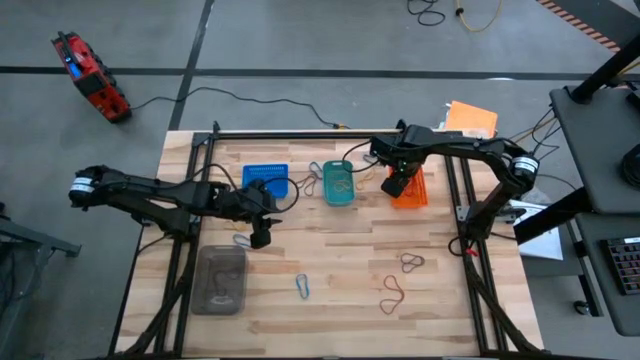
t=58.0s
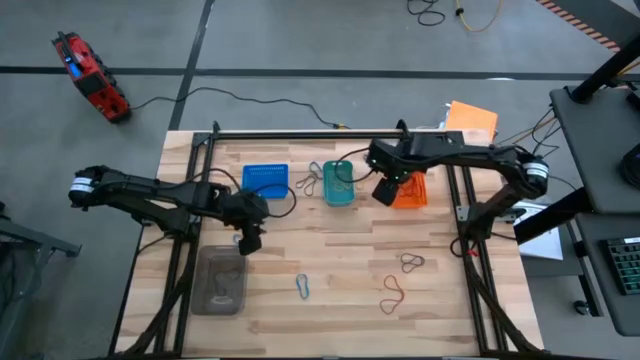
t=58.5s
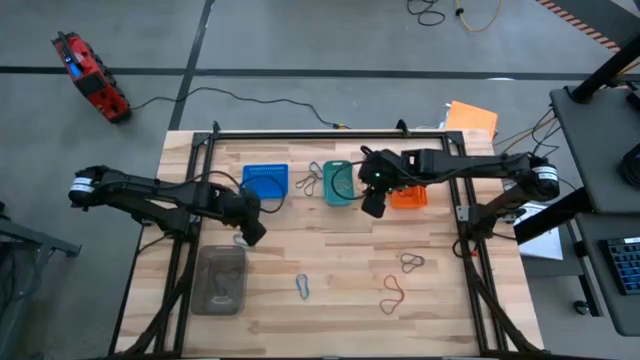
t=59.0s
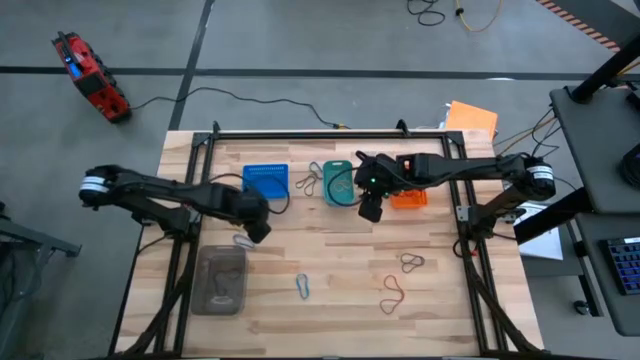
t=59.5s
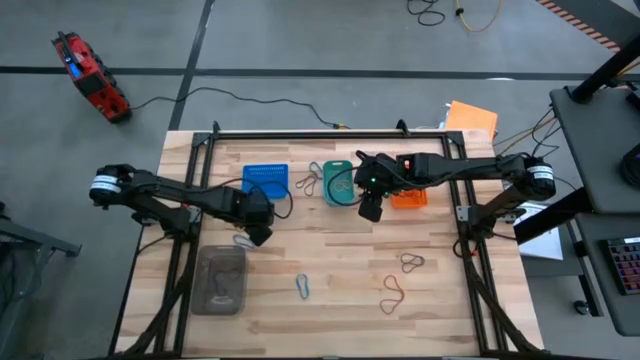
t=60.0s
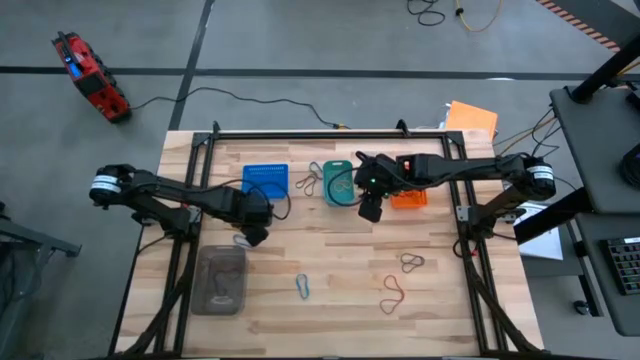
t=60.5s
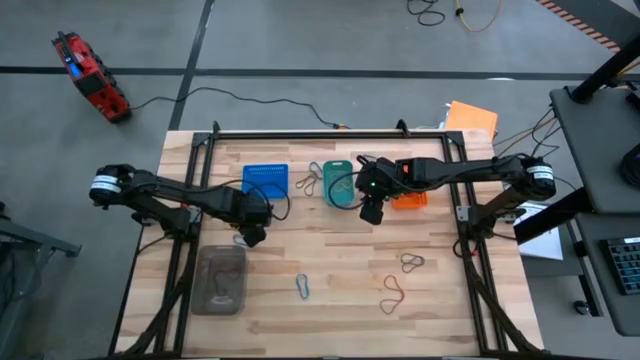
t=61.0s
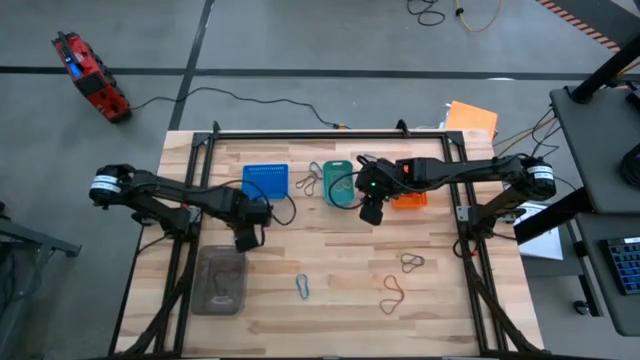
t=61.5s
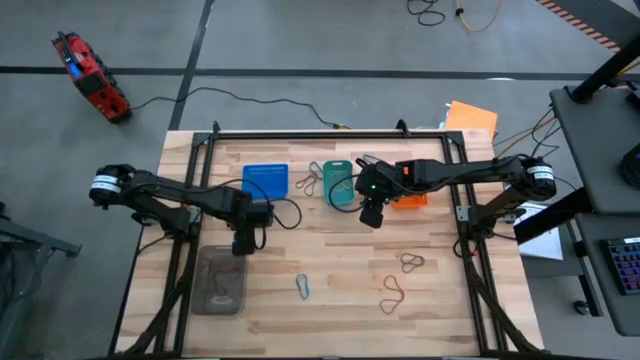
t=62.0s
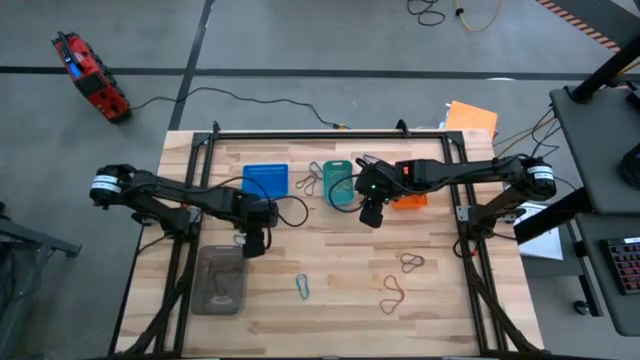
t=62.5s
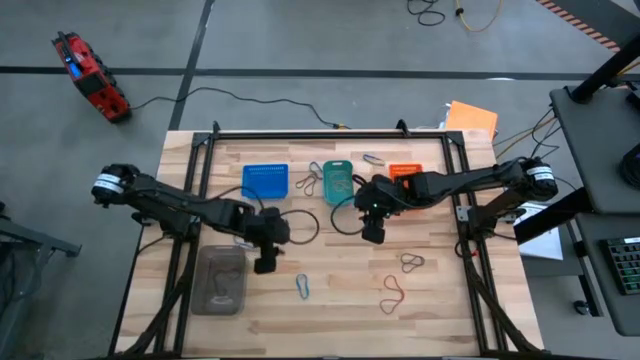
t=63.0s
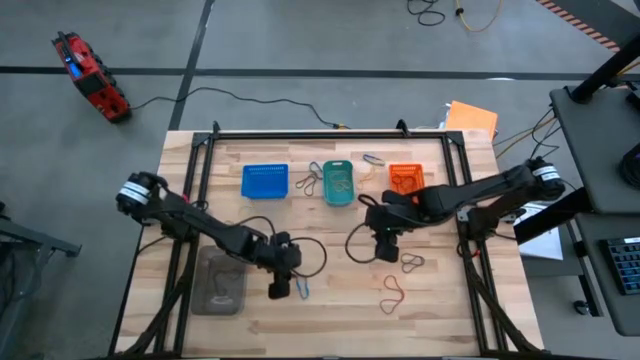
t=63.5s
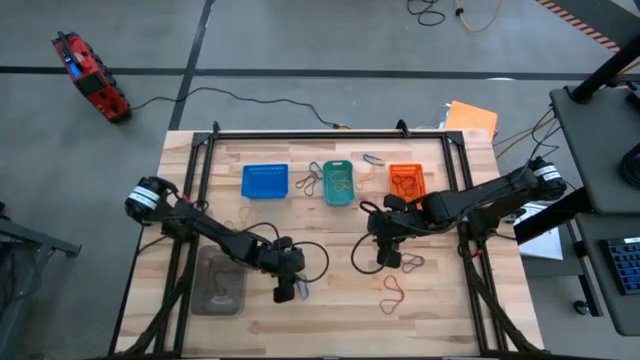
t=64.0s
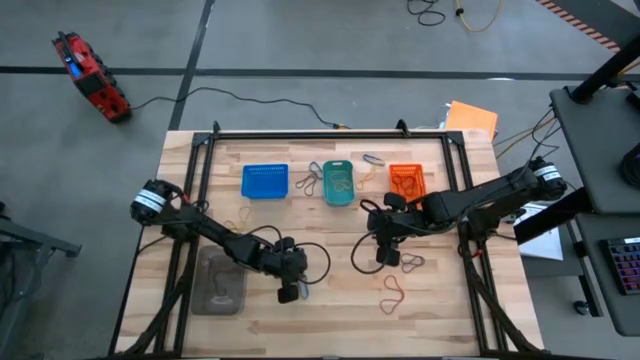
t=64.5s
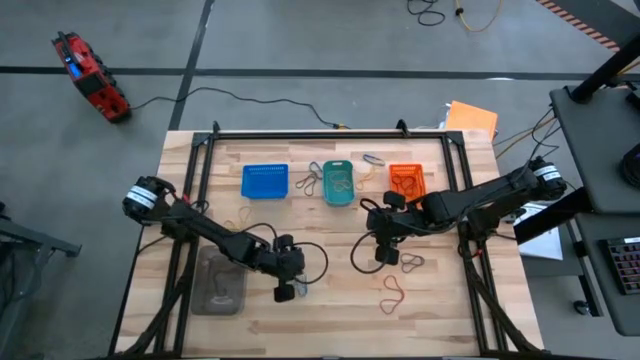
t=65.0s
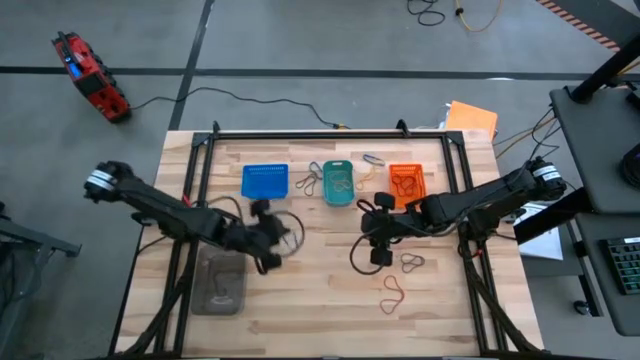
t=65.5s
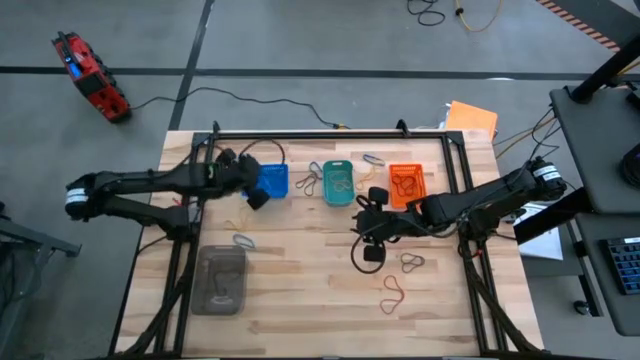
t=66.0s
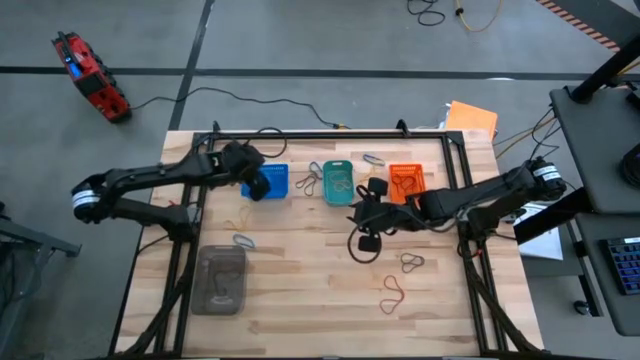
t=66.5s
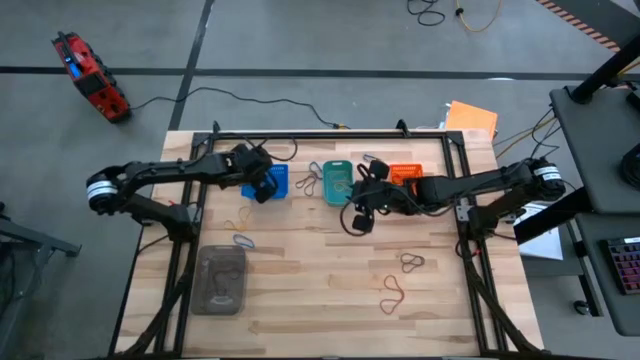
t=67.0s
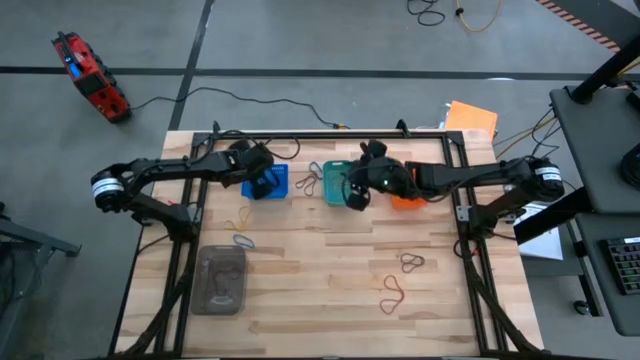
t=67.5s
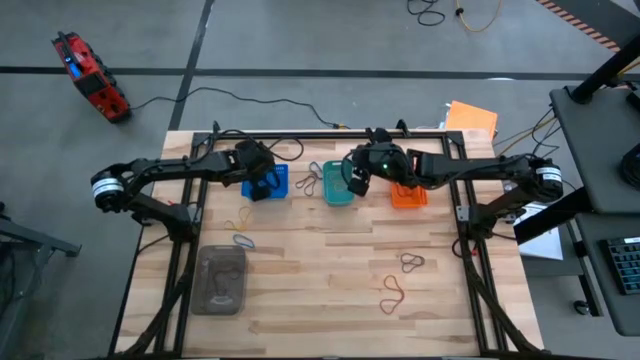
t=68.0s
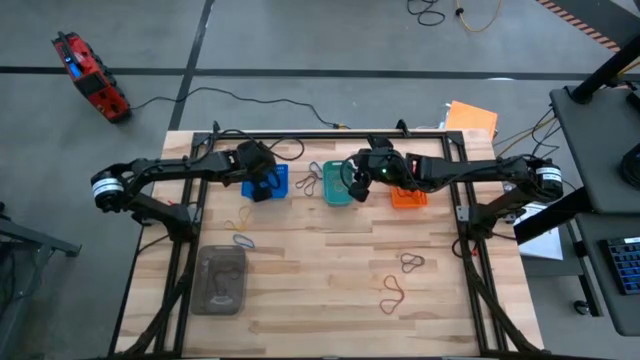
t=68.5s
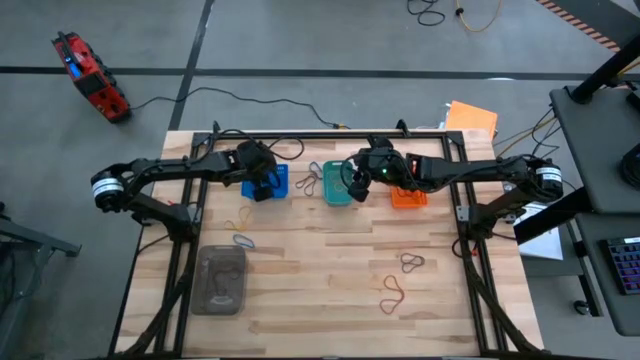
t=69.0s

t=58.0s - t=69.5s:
Task: Sort rubber bands into baskets
Put the bottom center blue rubber band into the blue bin

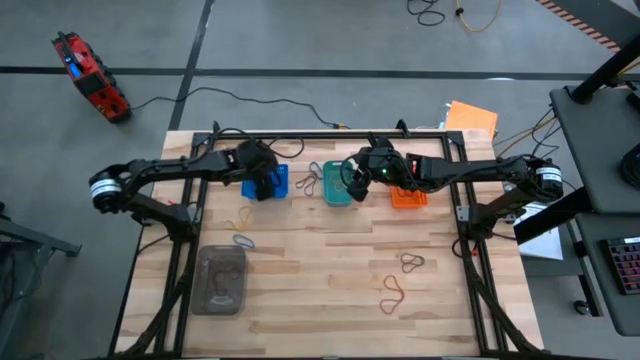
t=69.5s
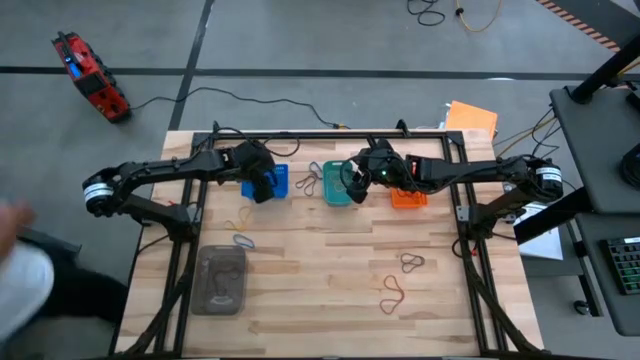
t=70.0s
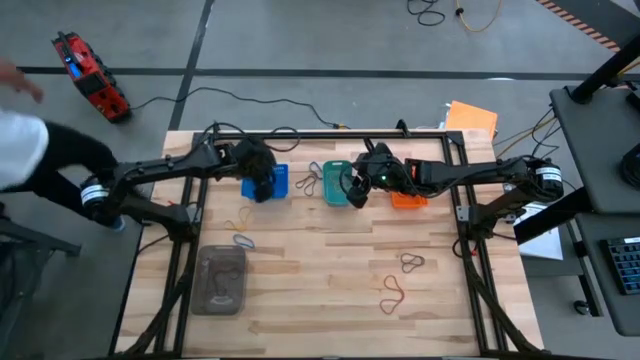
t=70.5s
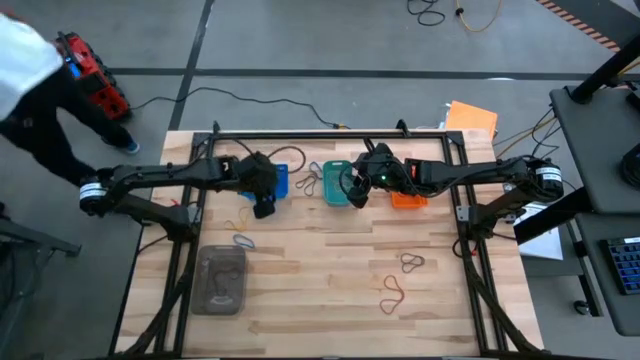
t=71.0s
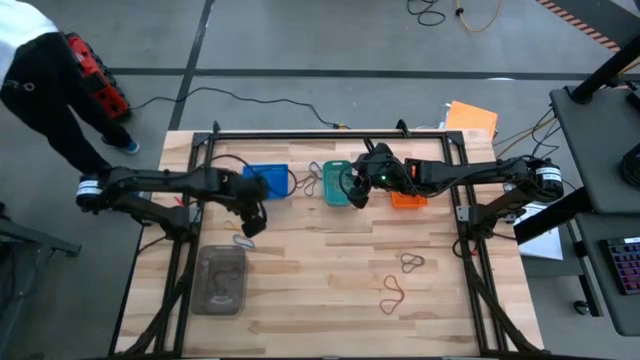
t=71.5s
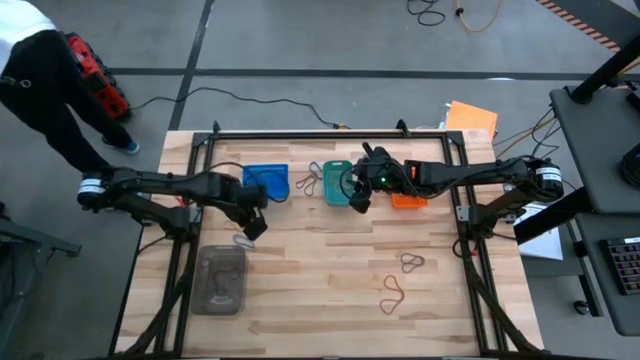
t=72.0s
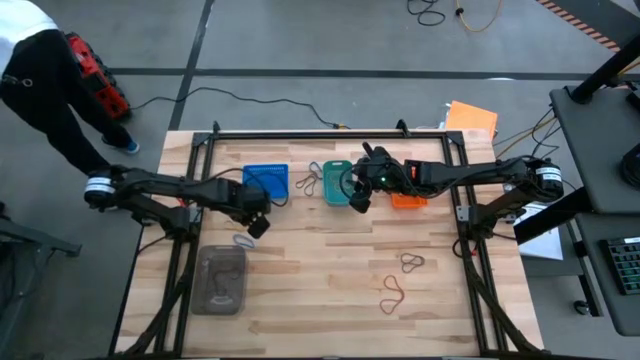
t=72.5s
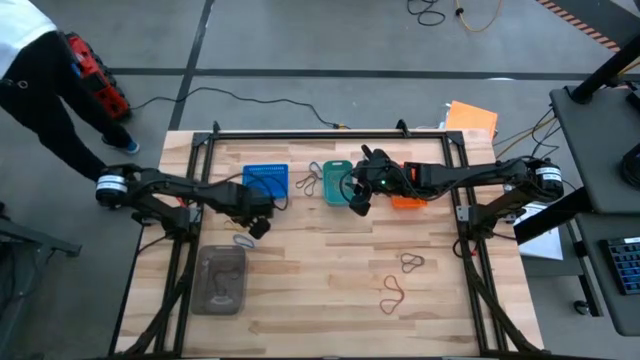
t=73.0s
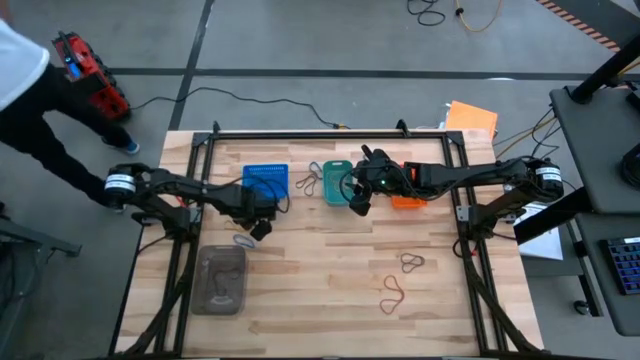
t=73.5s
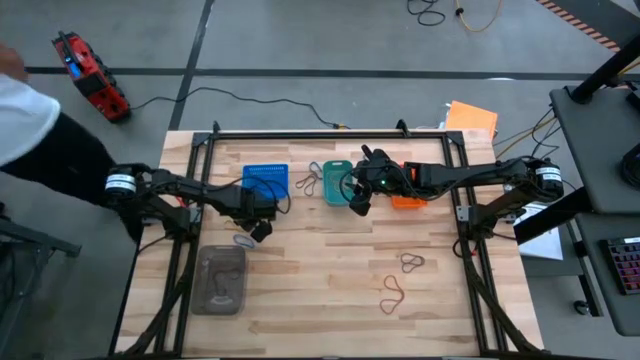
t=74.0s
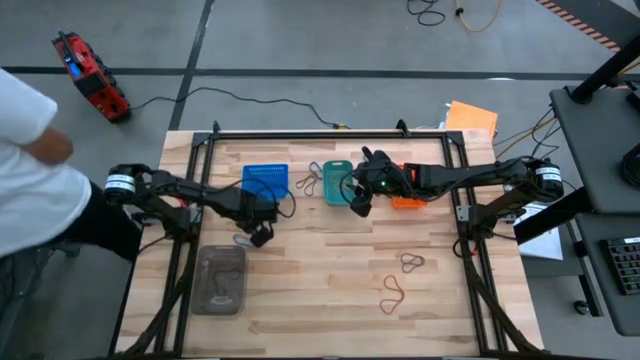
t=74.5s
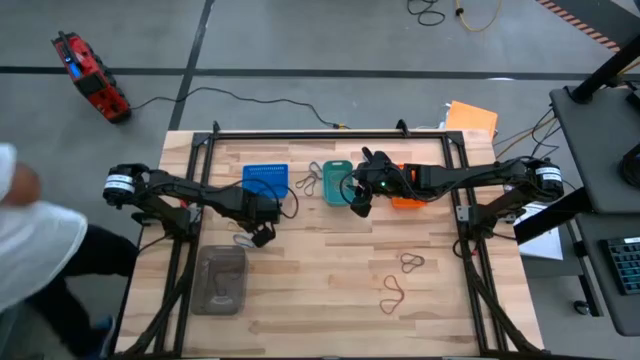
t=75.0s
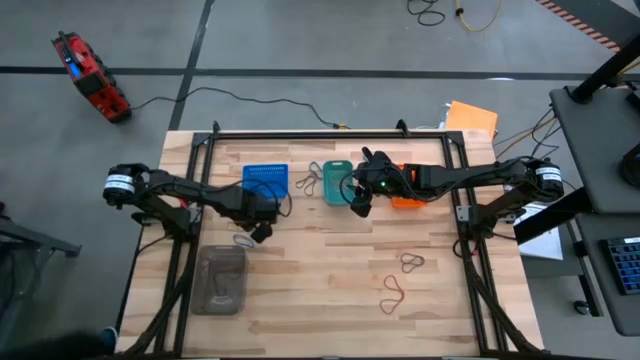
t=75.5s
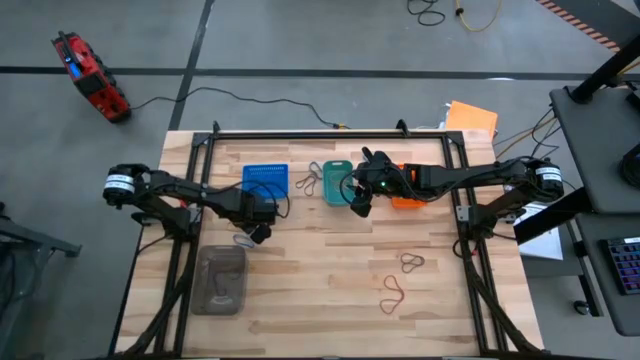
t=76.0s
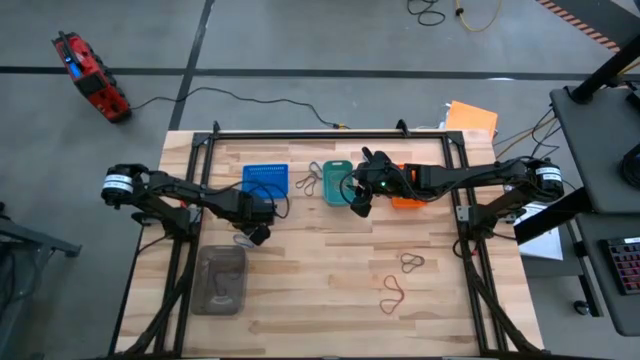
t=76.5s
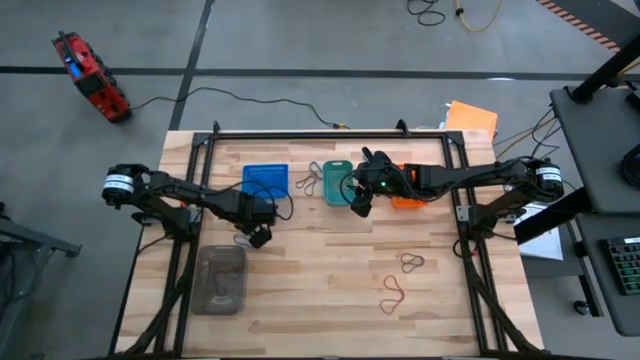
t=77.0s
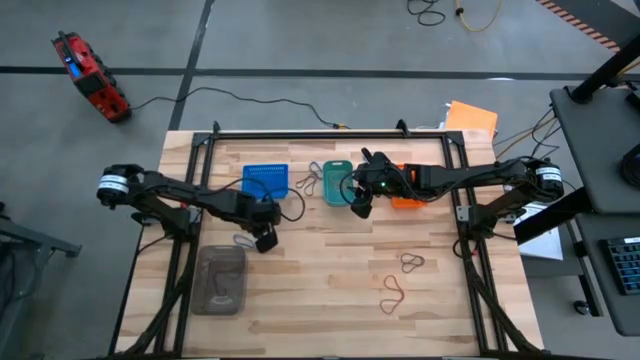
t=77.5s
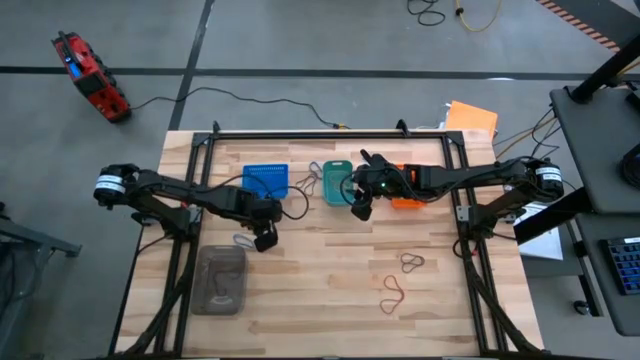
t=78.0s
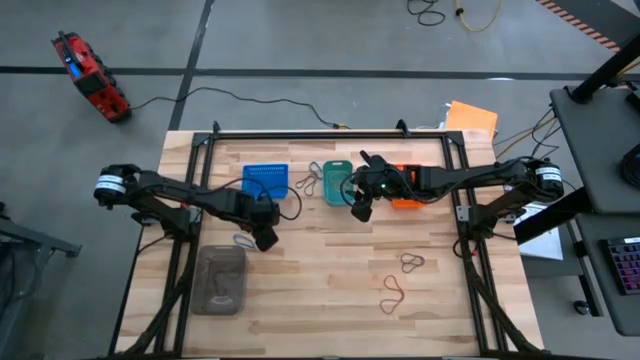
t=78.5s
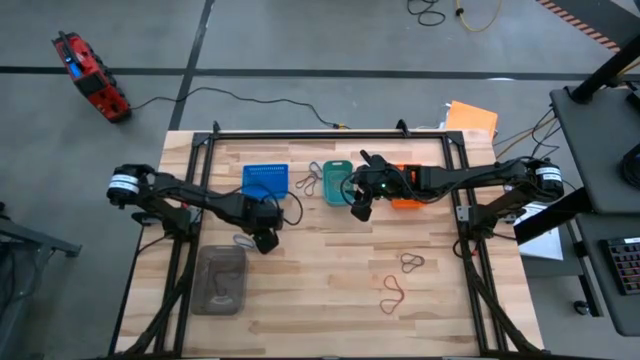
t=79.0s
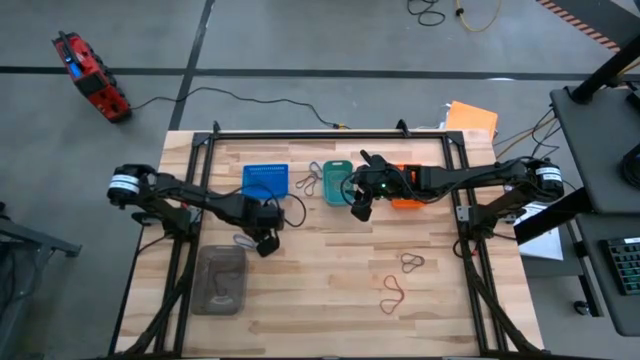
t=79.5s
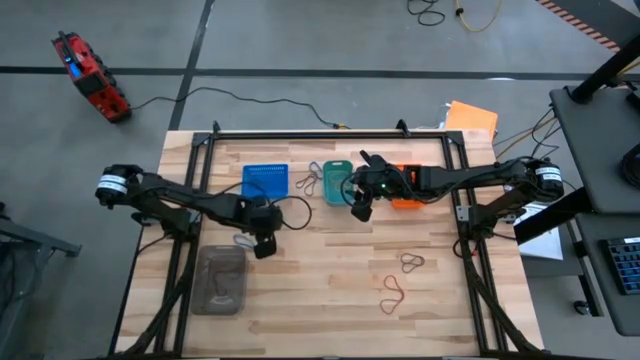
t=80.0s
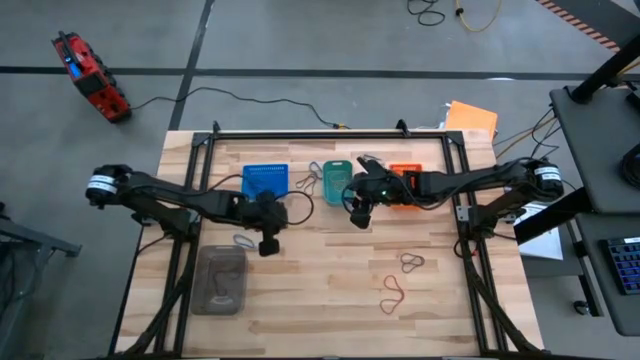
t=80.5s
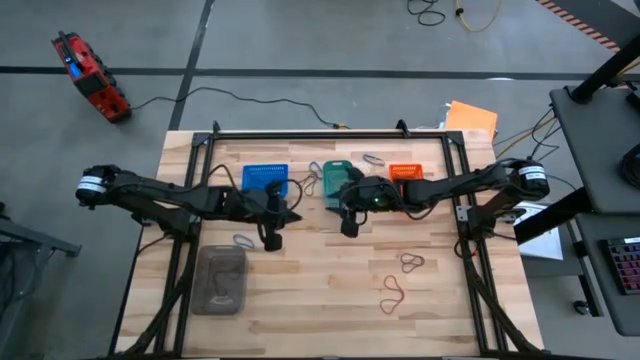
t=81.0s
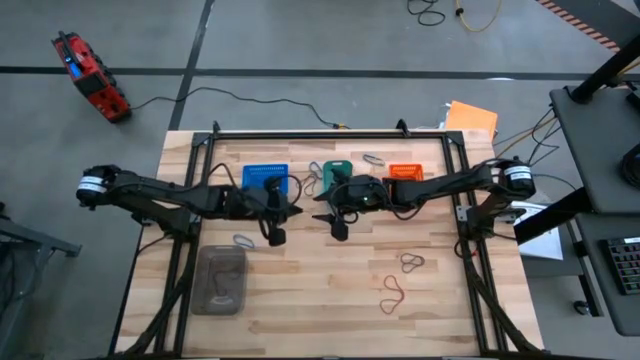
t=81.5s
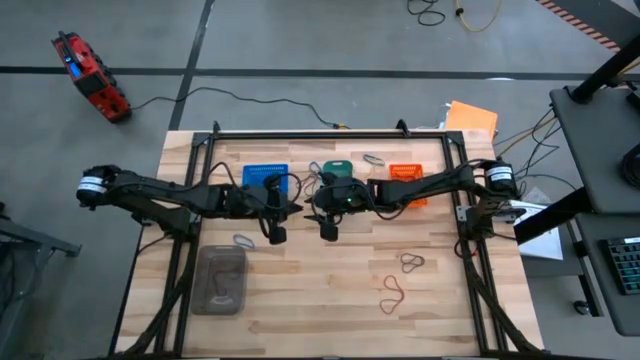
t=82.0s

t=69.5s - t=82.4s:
Put the left yellow rubber band into the green bin
